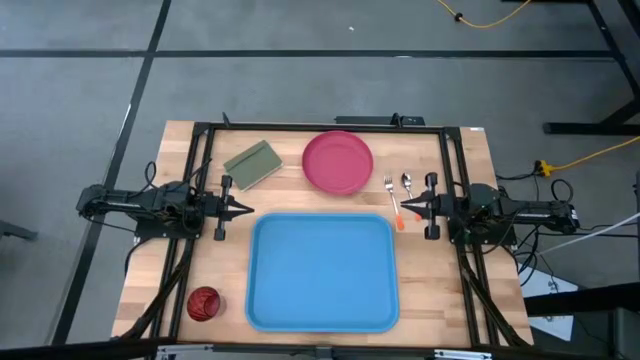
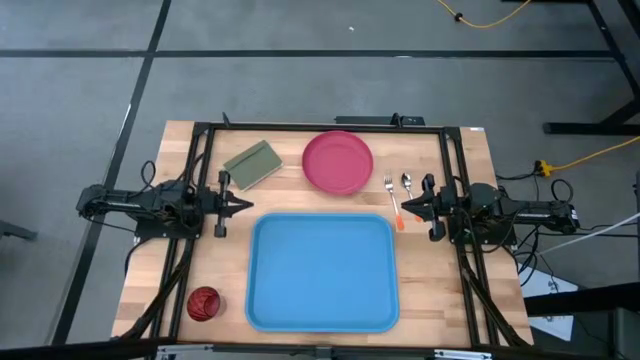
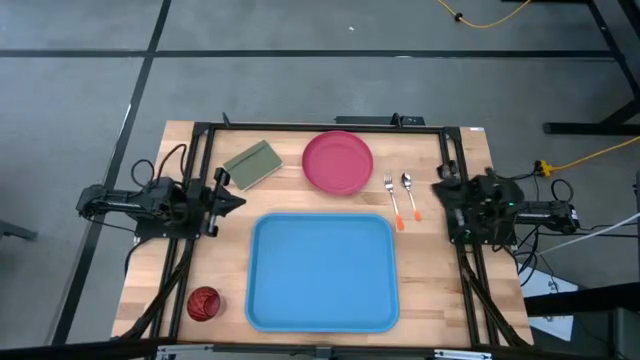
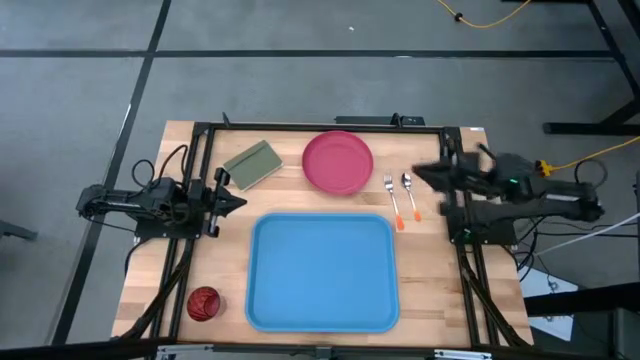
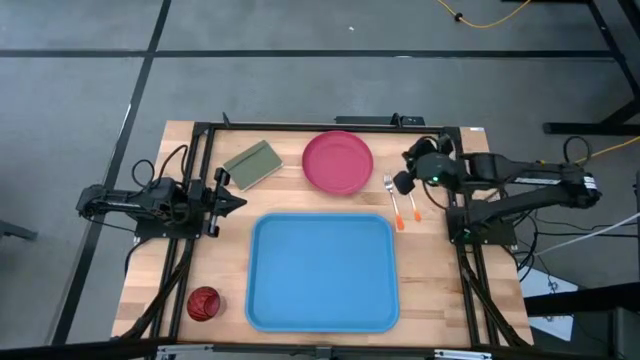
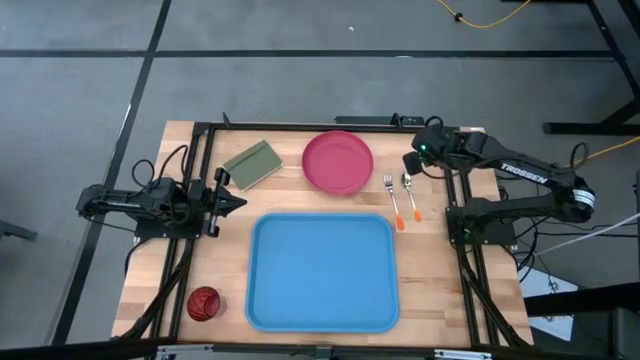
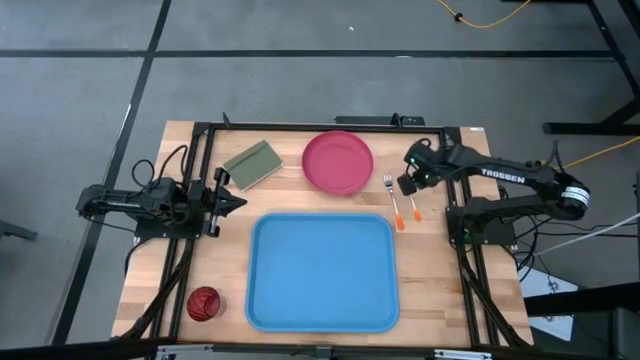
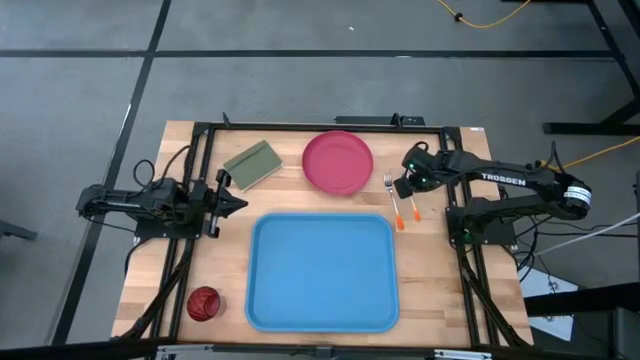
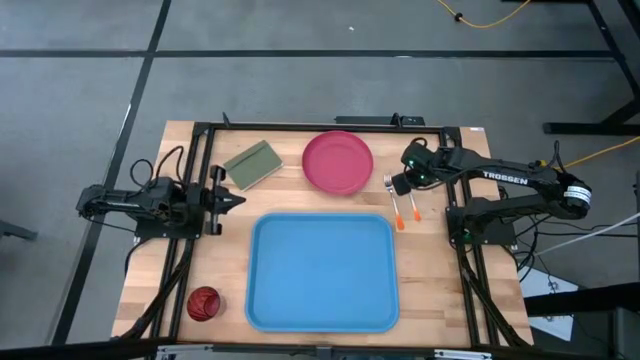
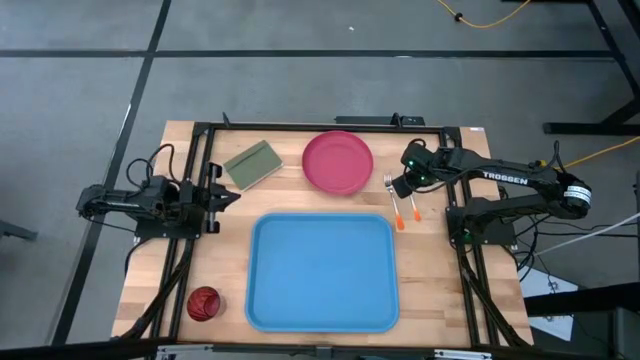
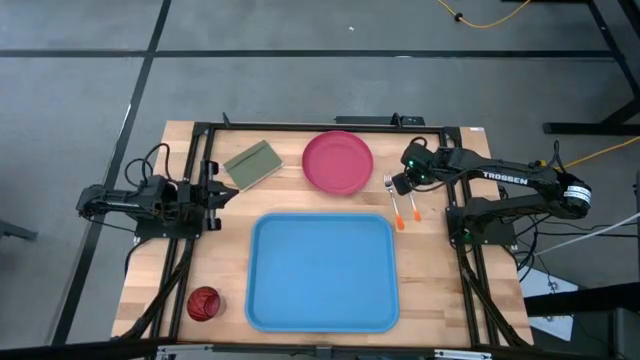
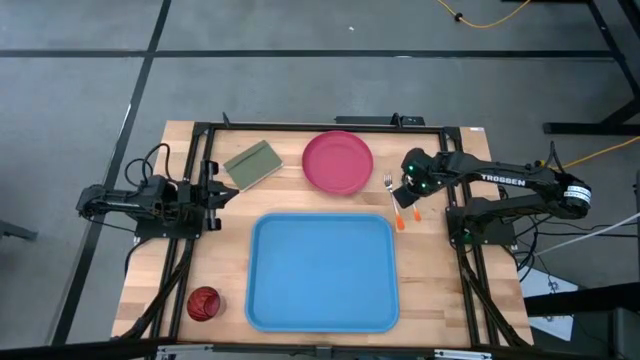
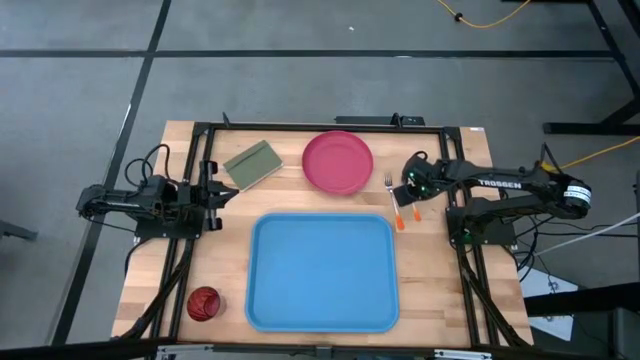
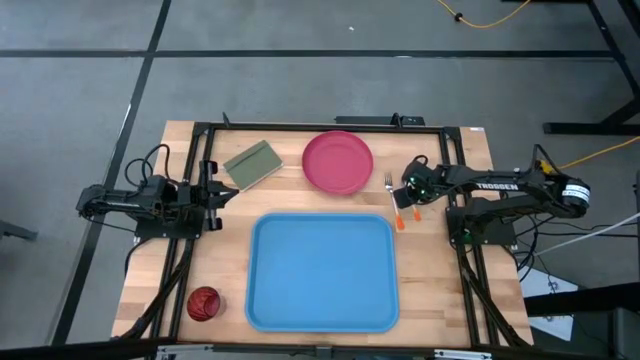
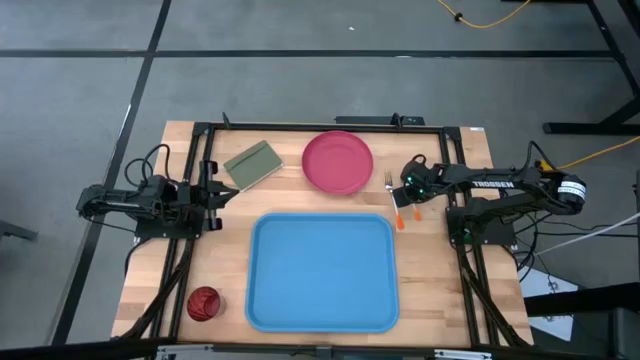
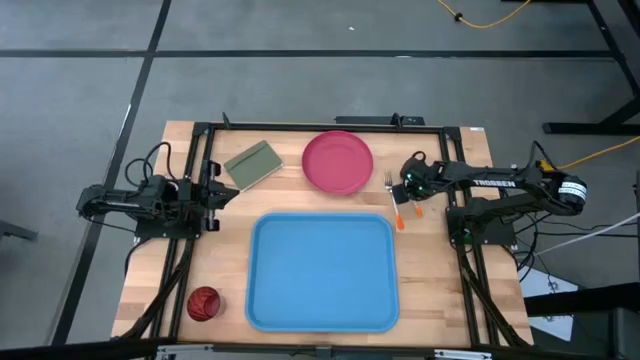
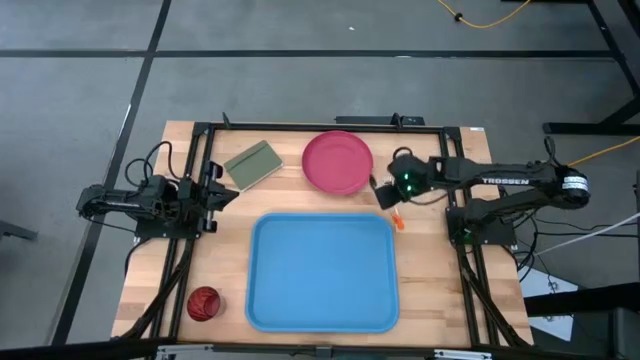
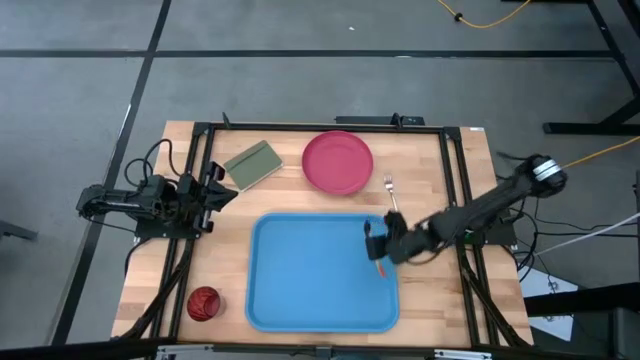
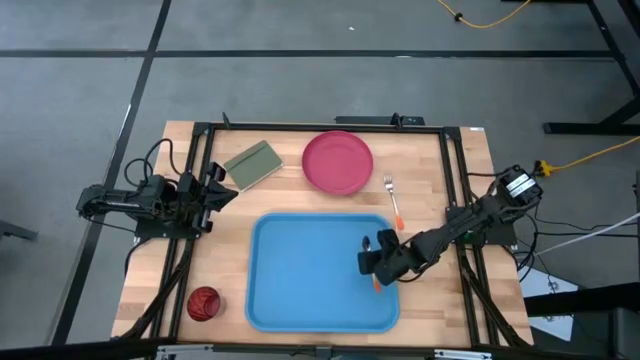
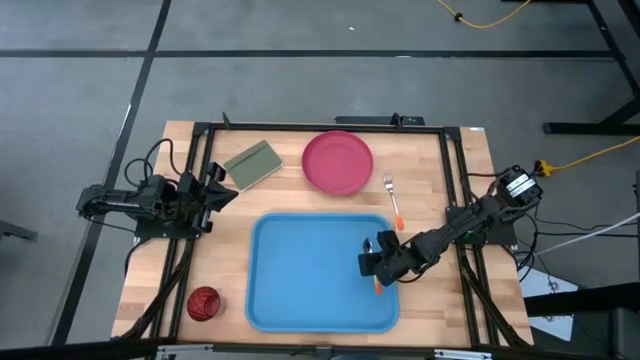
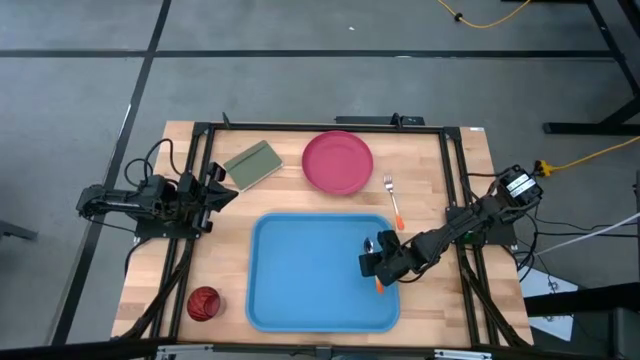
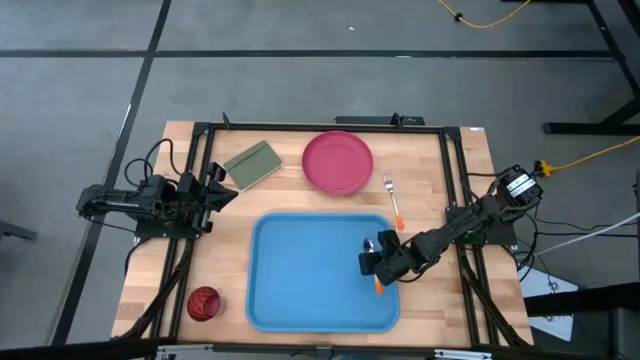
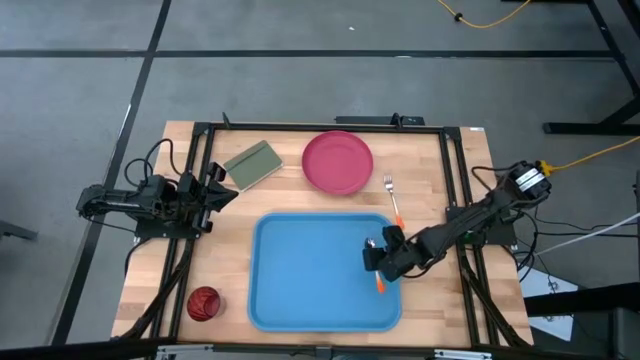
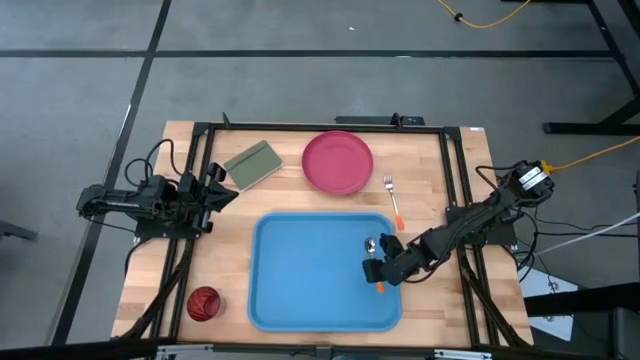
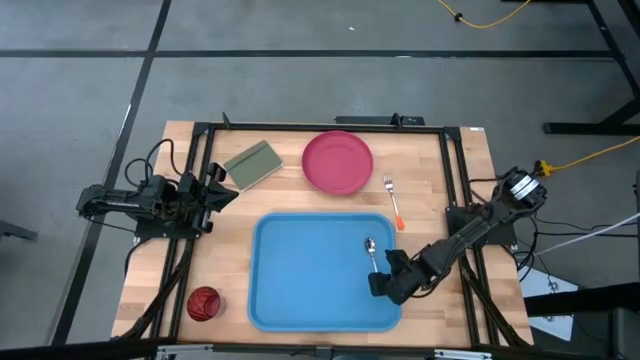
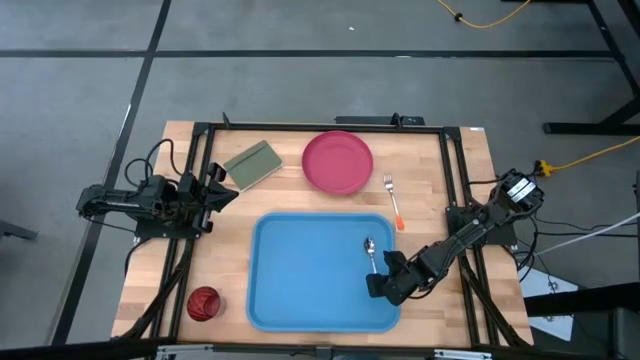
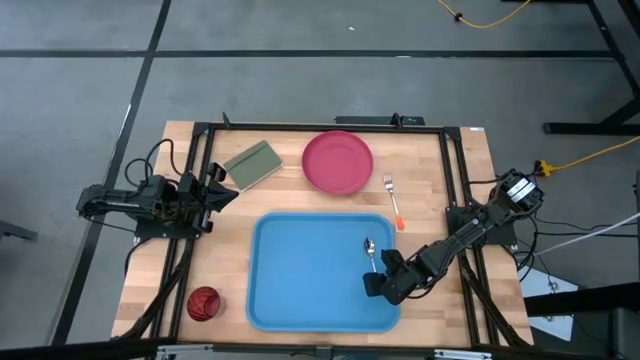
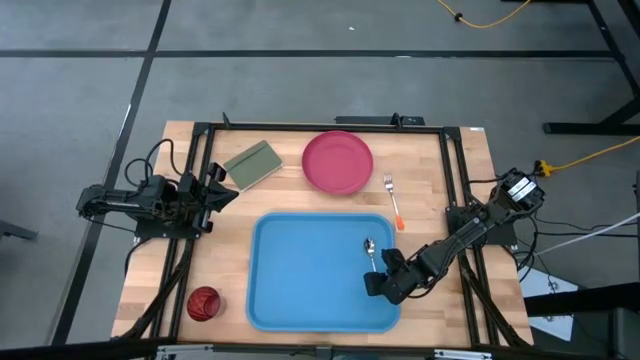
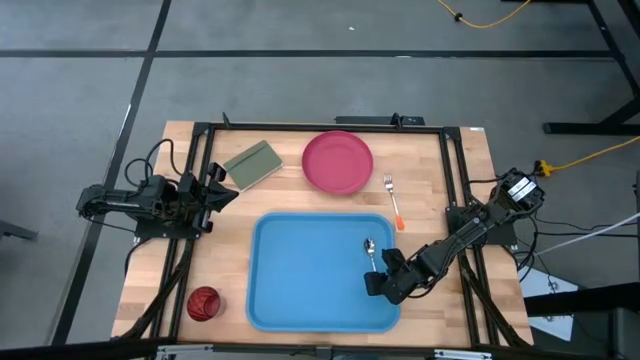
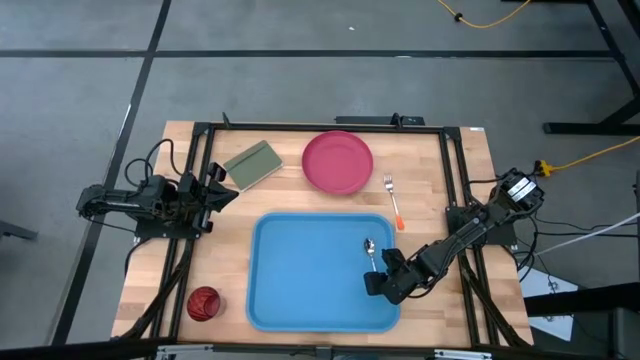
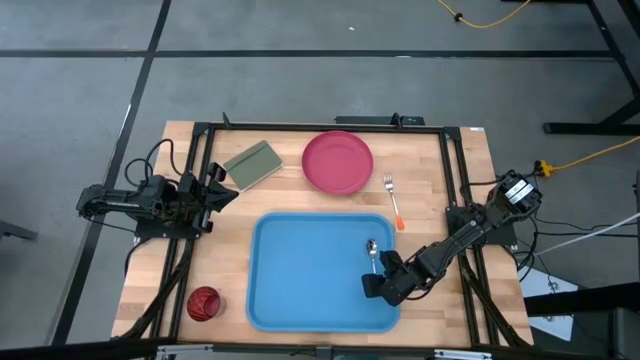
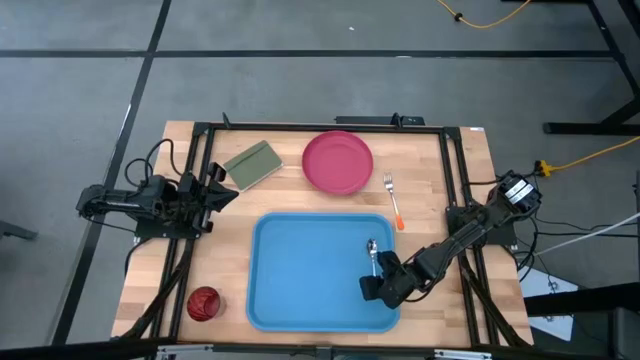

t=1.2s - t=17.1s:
Task: Pick and place plate/cup/fork/spoon on tray
Put the orange spoon on the right of the blue tray

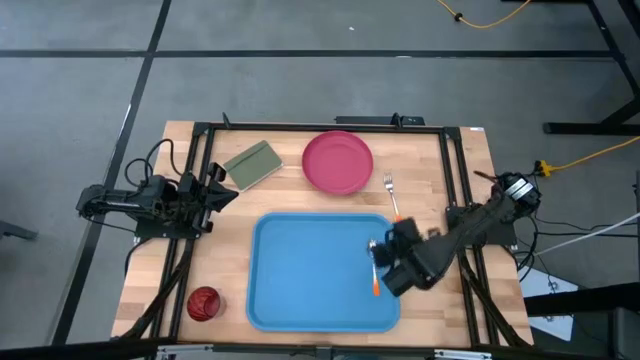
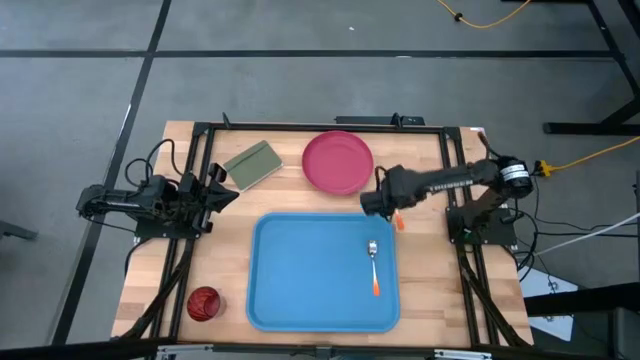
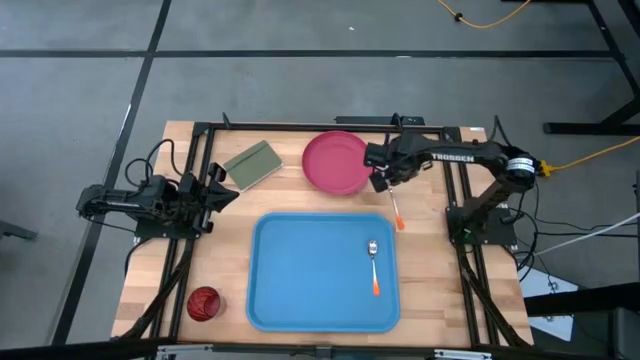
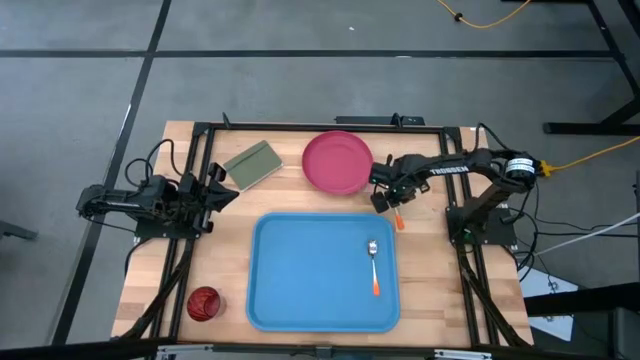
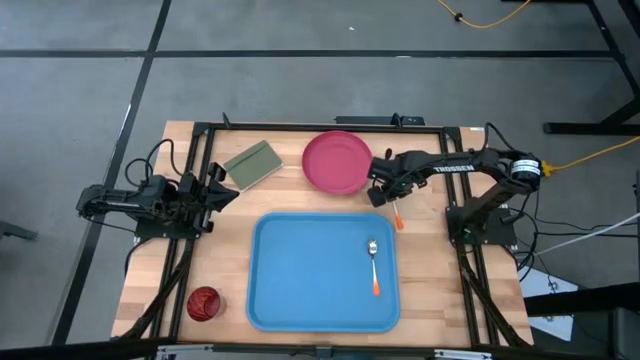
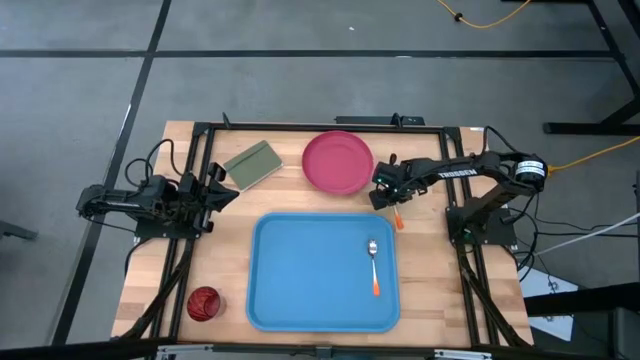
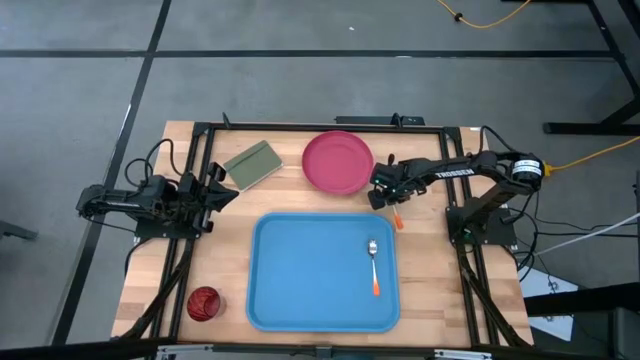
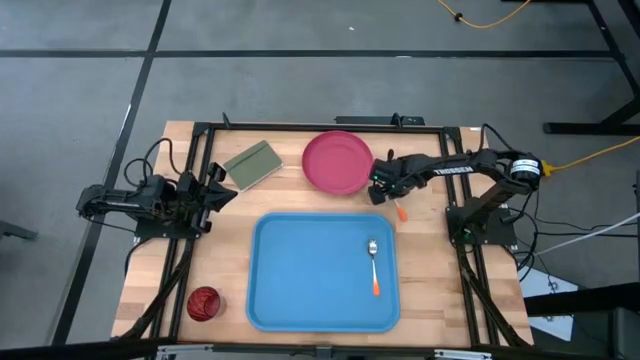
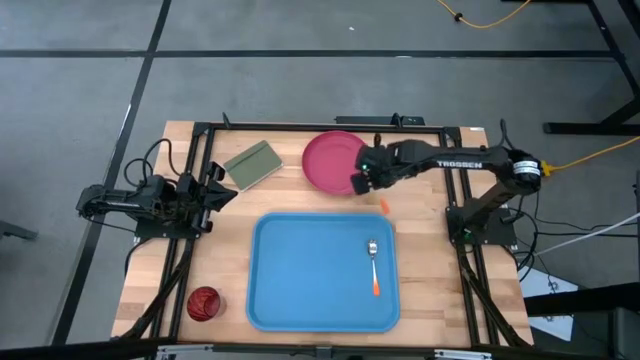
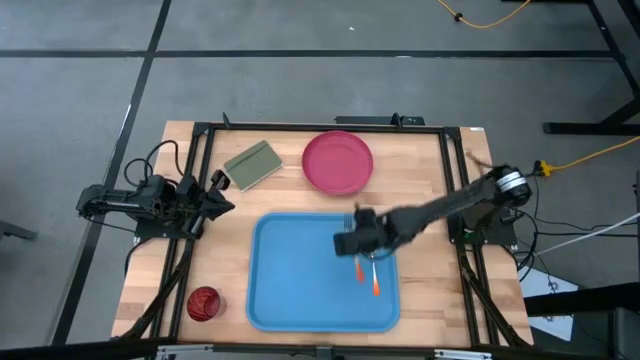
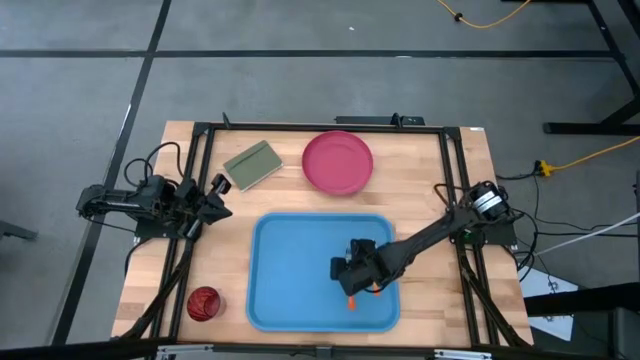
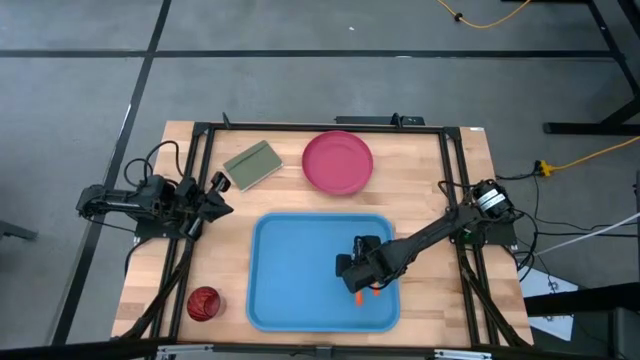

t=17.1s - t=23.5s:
Put the orange fork to the left of the orange spoon on the blue tray
